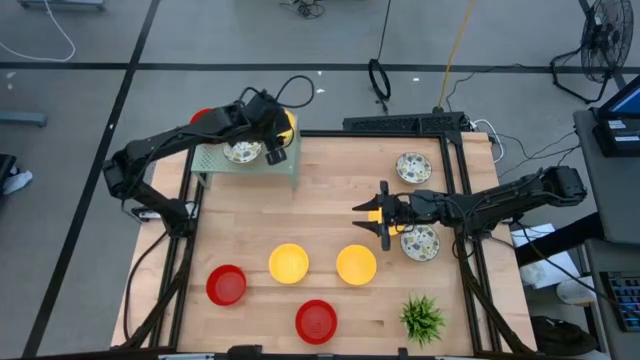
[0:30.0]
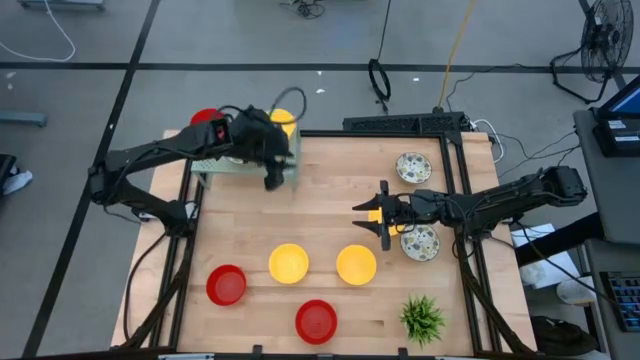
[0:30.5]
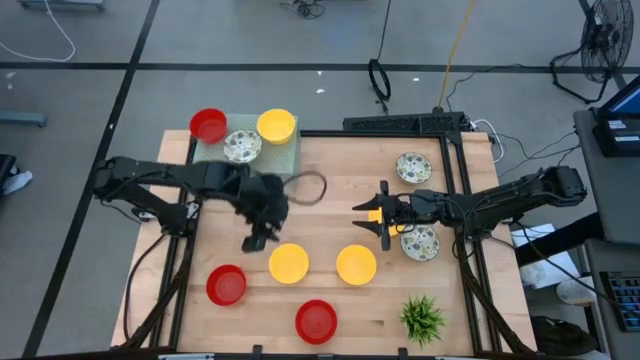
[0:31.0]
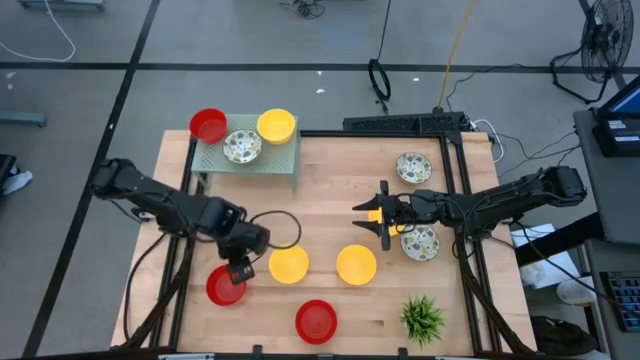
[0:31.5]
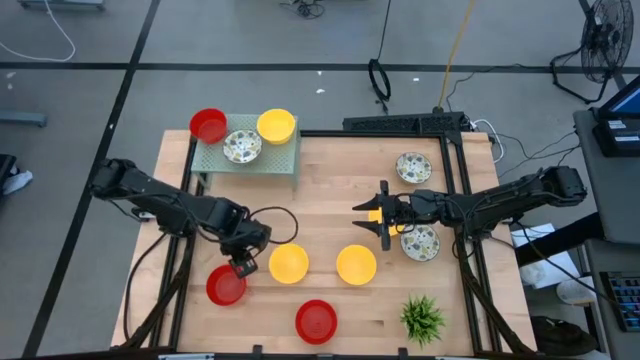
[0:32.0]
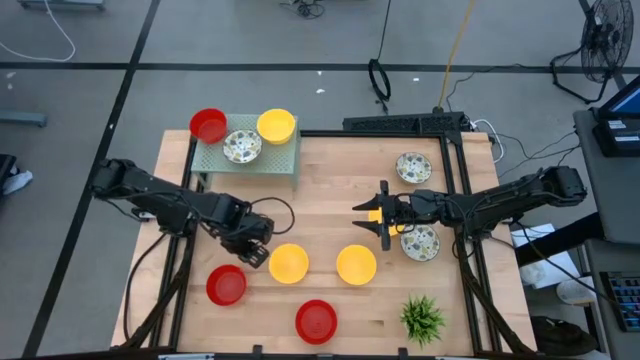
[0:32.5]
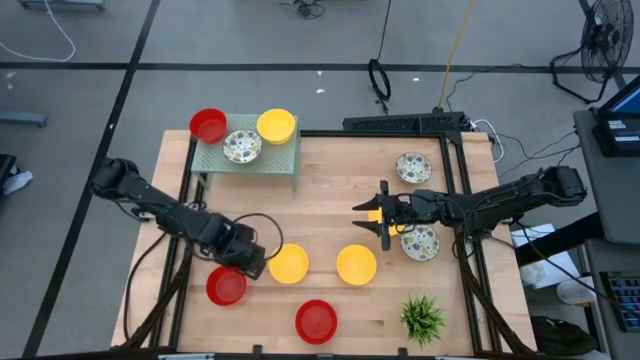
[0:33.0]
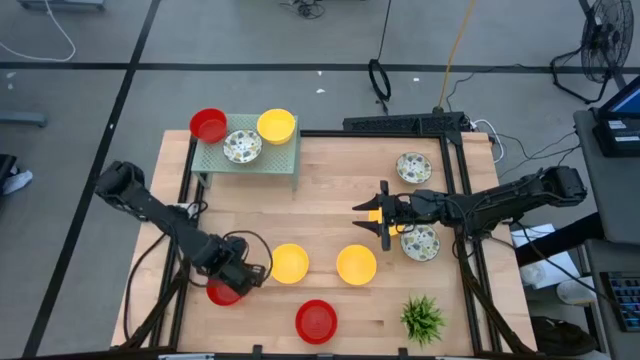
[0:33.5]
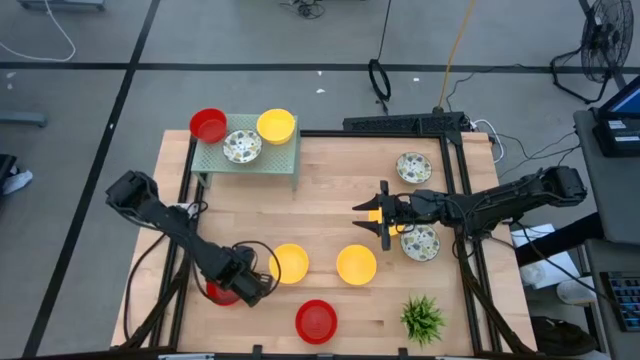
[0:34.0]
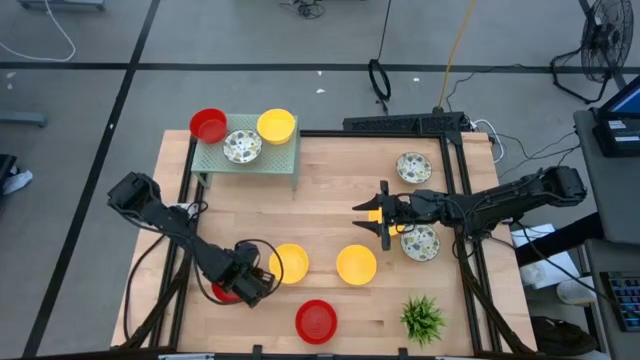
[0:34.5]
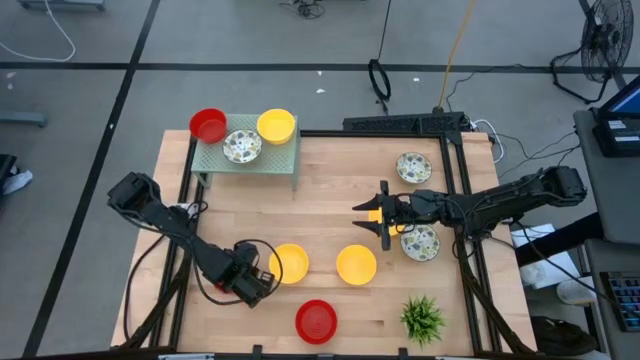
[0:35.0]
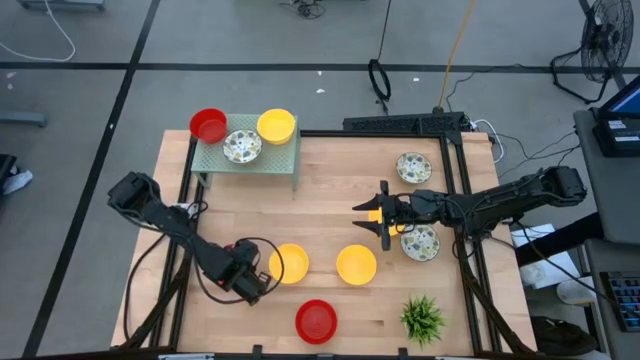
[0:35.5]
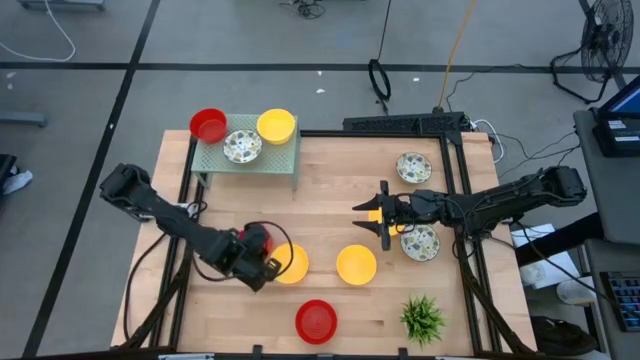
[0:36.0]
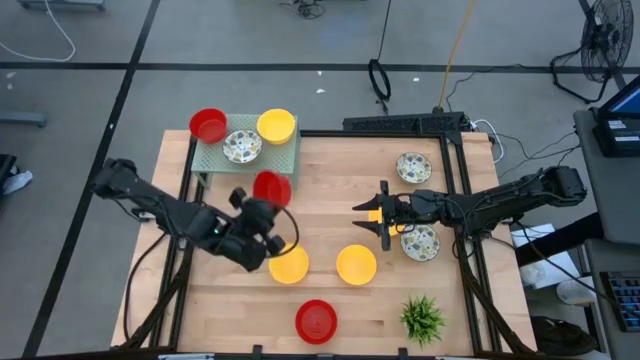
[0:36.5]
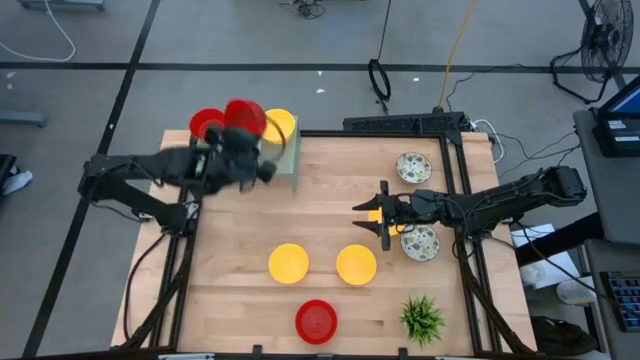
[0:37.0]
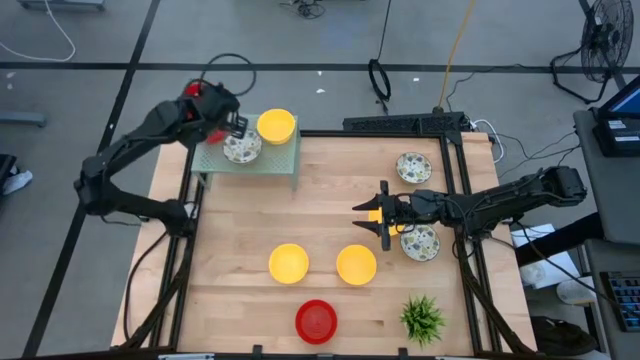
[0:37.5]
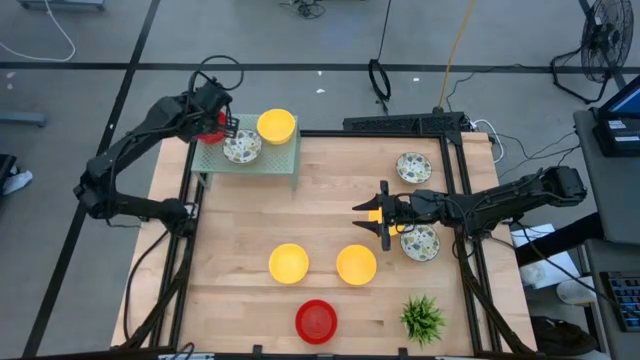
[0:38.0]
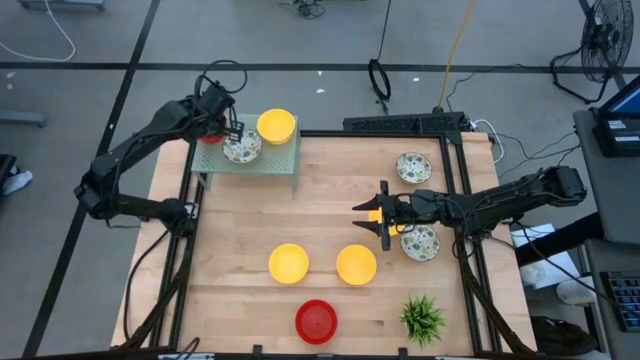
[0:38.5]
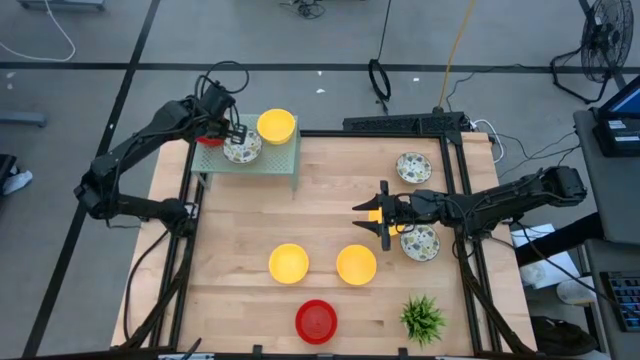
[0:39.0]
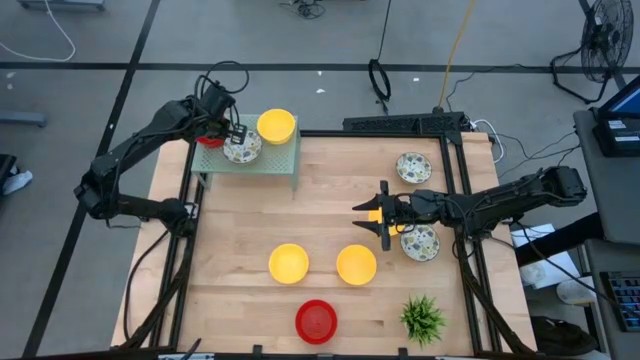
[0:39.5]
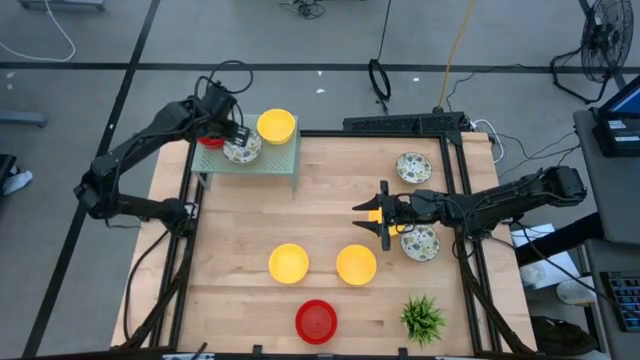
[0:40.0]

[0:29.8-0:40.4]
Task: Pick & Place Mini bowls
Stack the red bowl on top of the red bowl on the shelf

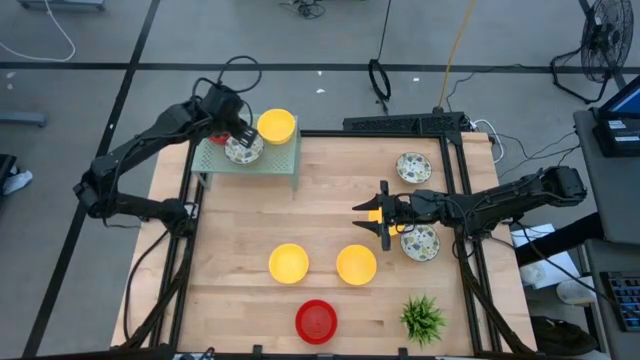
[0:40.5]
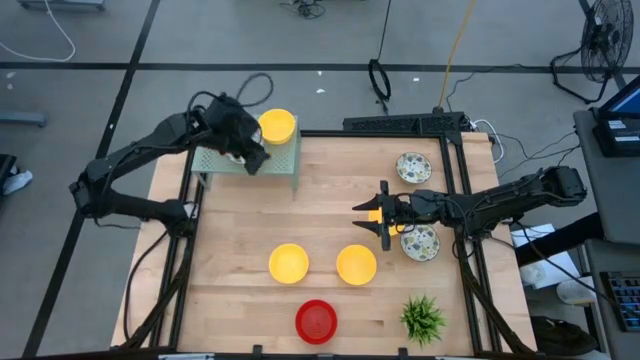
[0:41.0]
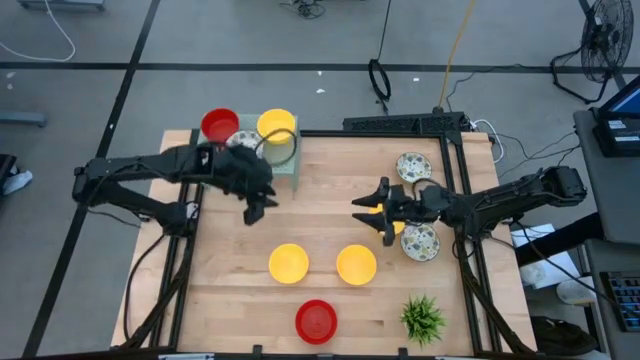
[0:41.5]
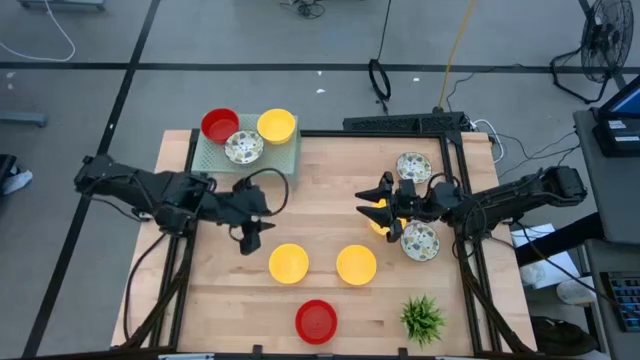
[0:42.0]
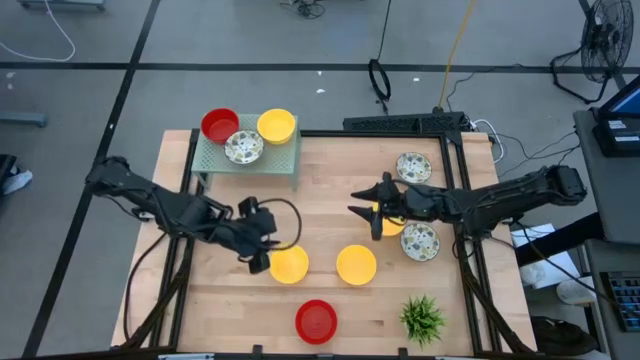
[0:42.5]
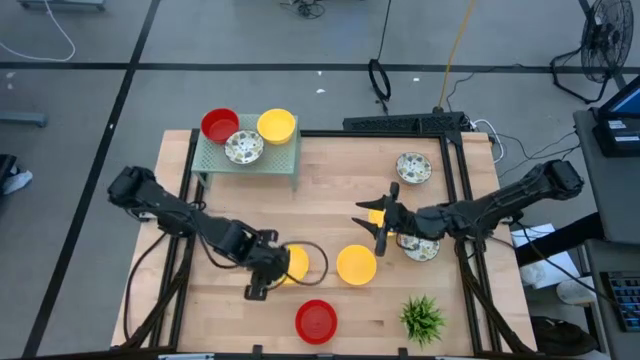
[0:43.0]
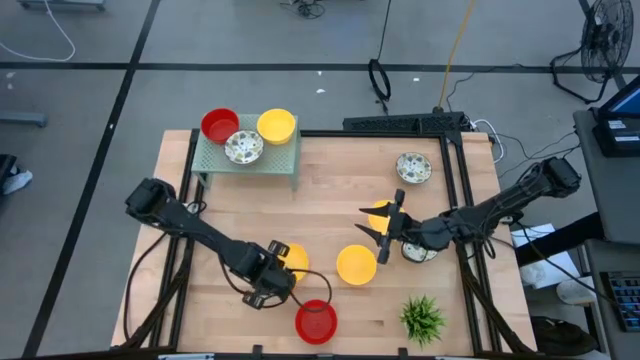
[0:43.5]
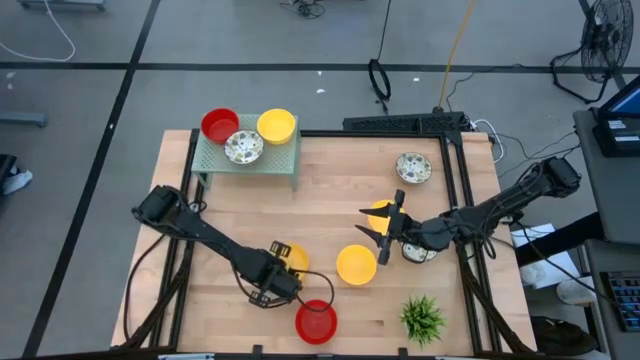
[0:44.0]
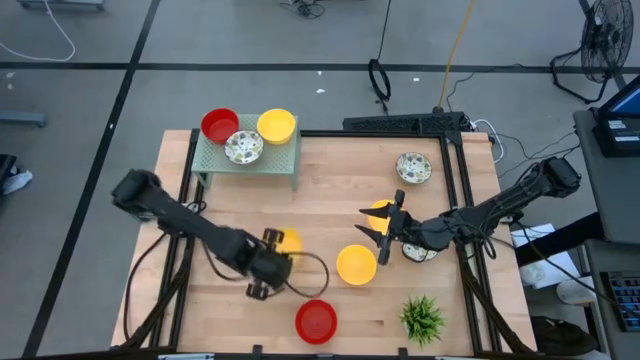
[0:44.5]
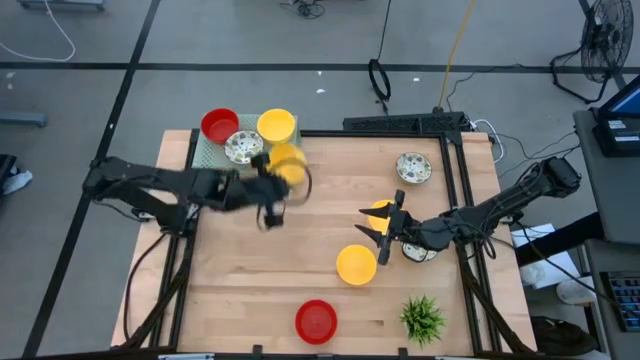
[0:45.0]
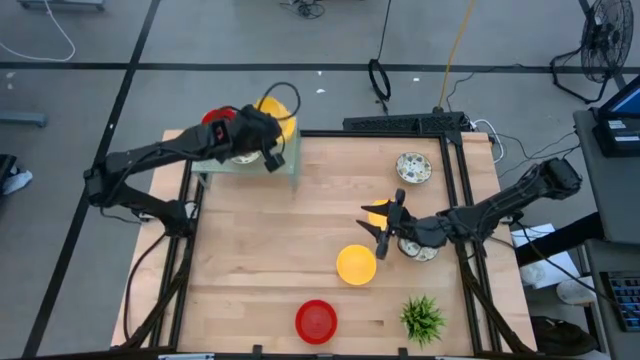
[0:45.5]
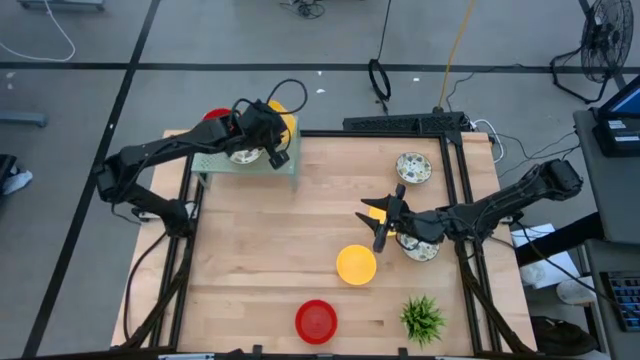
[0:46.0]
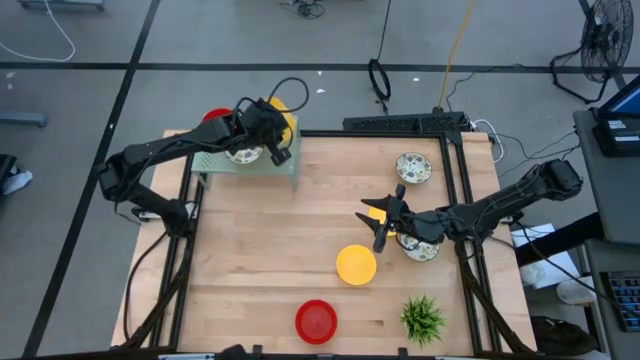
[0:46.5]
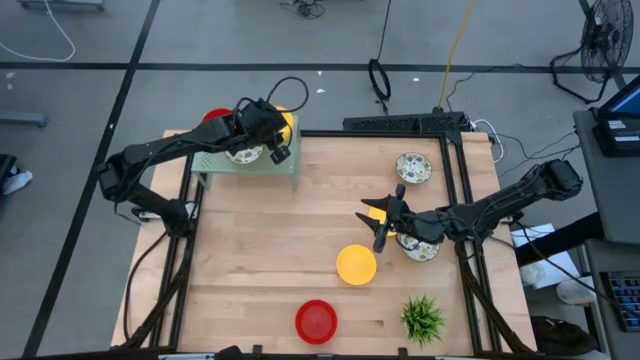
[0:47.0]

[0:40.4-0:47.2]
Stack the yellow bowl on top of the yellow bowl on the shelf

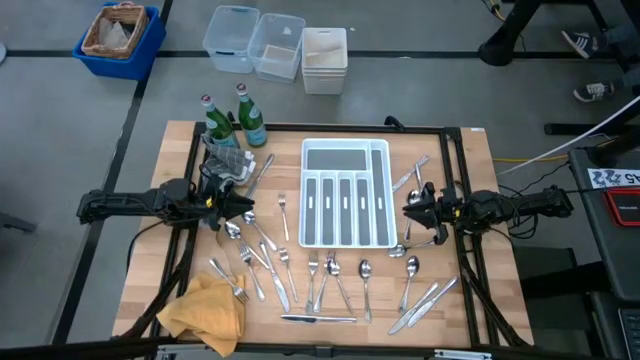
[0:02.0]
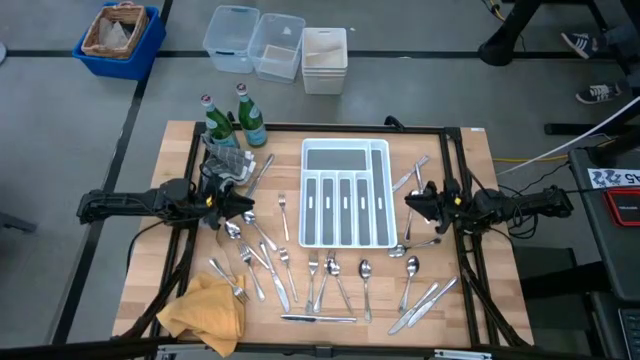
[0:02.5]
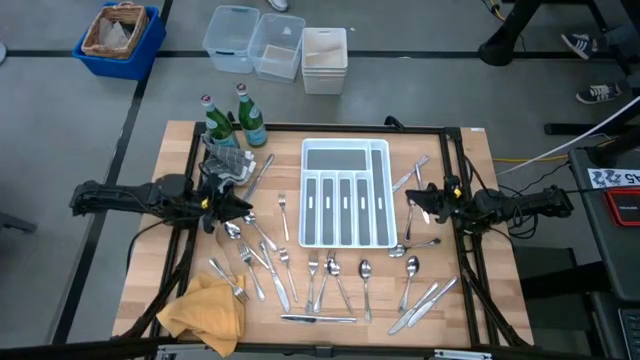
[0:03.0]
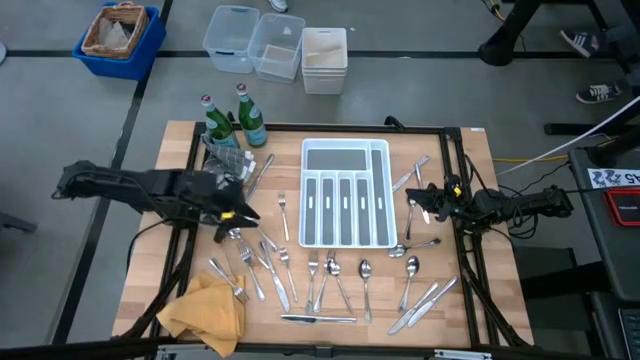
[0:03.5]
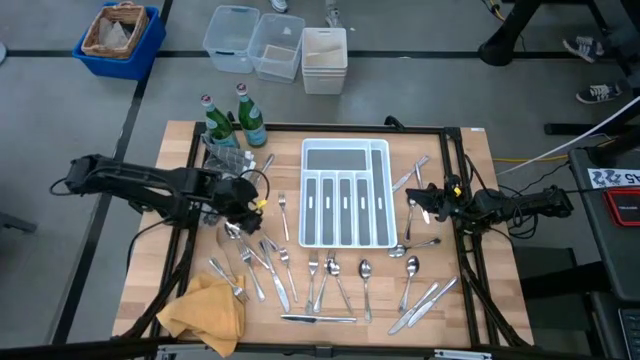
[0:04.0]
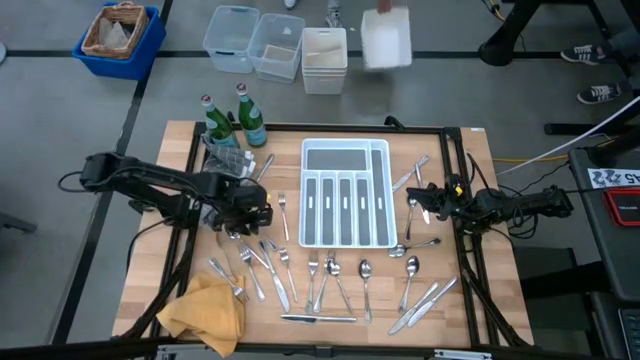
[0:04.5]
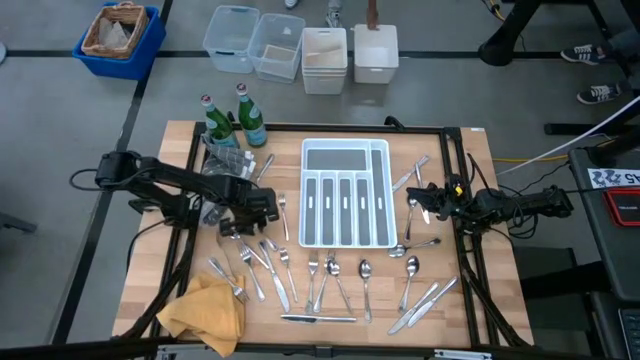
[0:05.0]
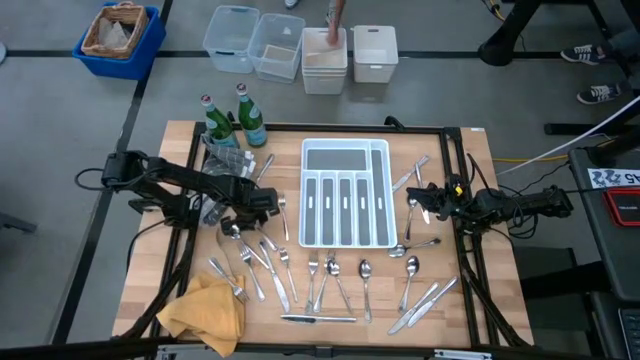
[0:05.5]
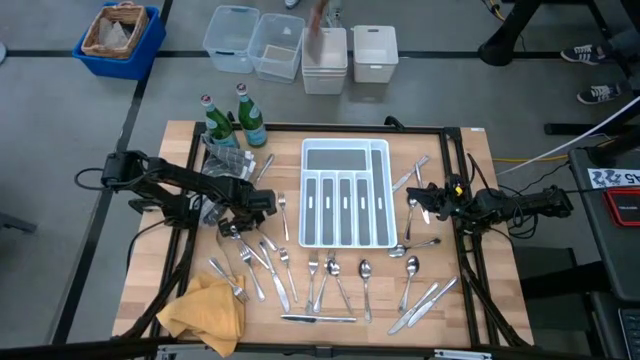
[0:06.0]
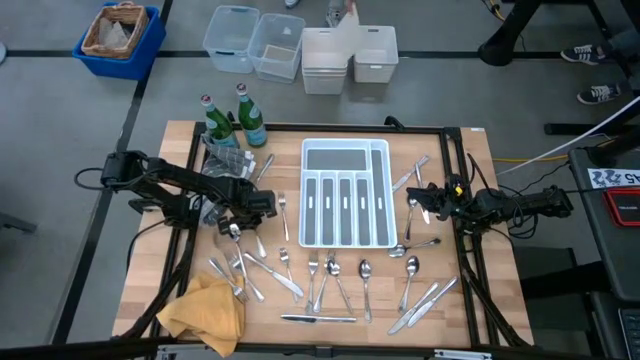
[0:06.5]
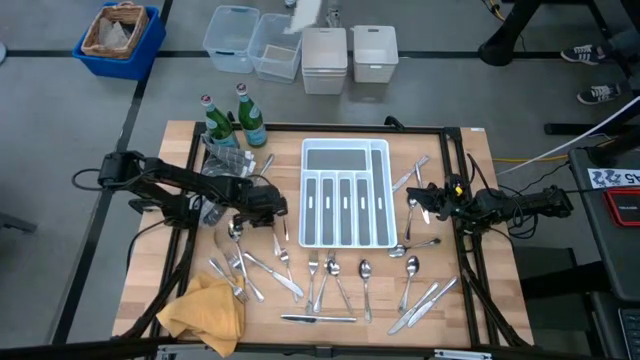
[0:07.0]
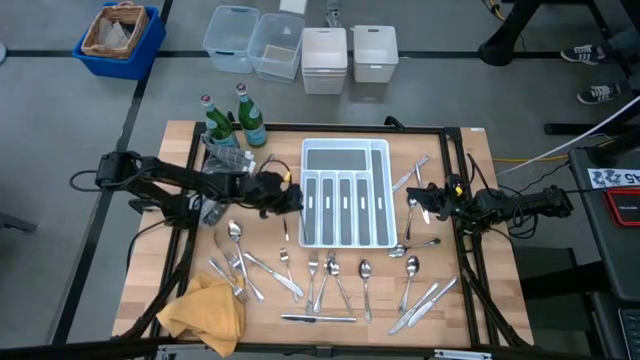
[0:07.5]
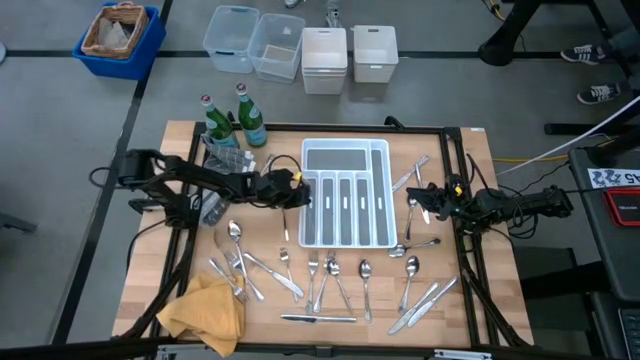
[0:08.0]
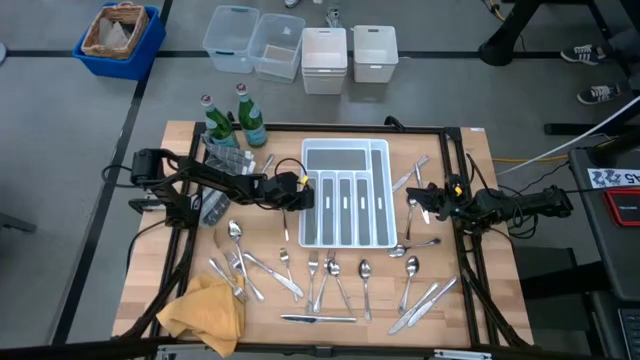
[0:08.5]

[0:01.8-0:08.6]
Task: Sort silverware
Put the silver spoon into the silverware tray
